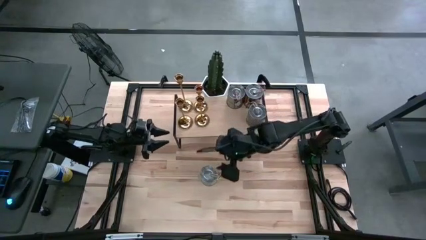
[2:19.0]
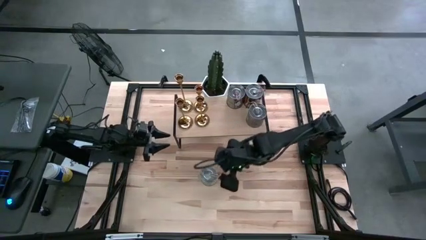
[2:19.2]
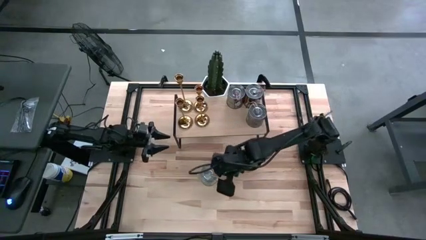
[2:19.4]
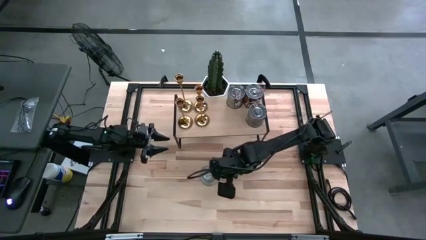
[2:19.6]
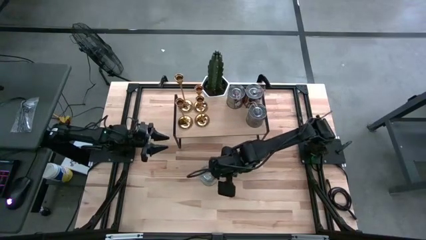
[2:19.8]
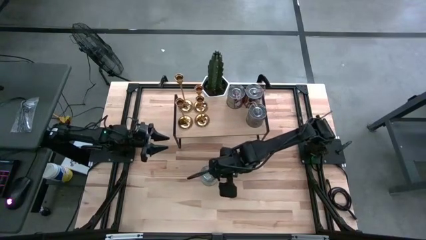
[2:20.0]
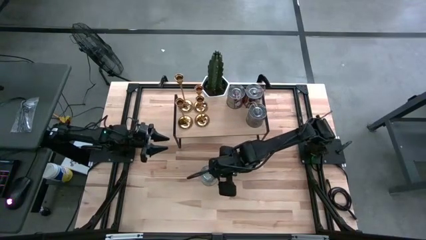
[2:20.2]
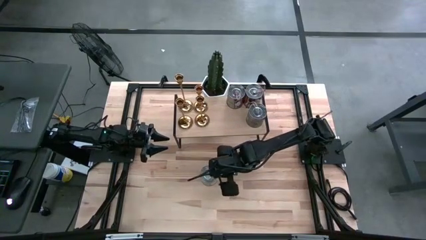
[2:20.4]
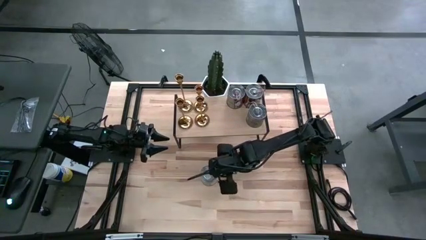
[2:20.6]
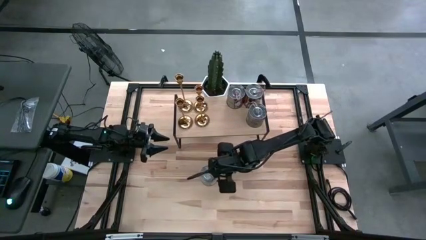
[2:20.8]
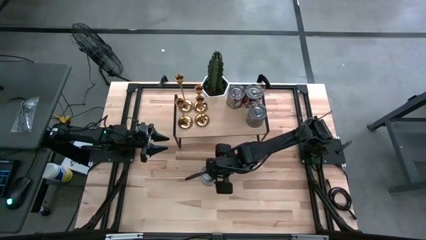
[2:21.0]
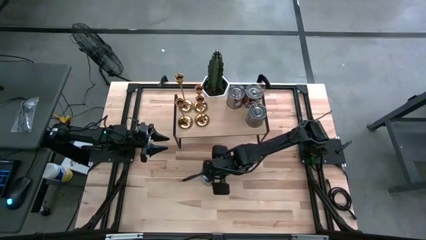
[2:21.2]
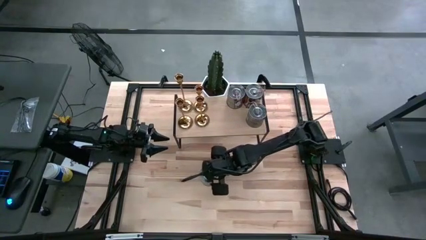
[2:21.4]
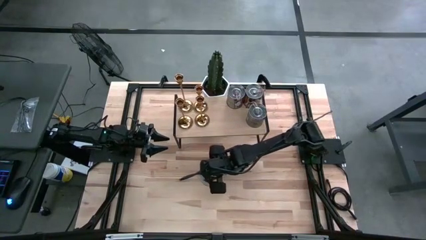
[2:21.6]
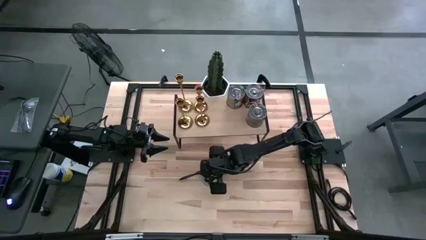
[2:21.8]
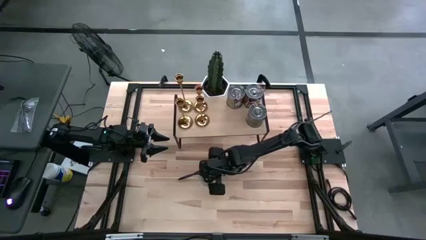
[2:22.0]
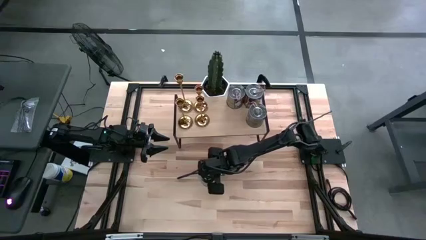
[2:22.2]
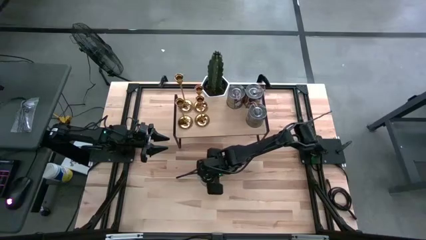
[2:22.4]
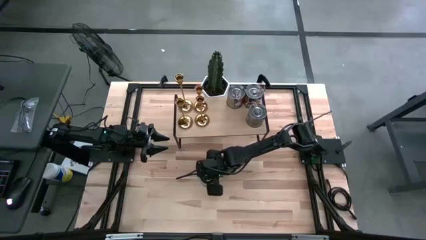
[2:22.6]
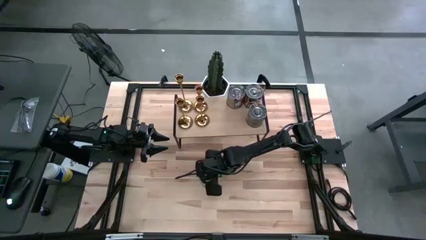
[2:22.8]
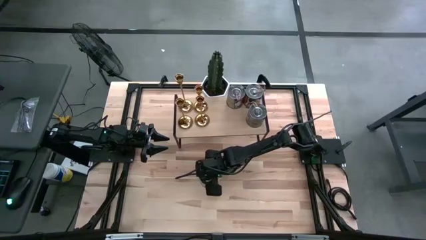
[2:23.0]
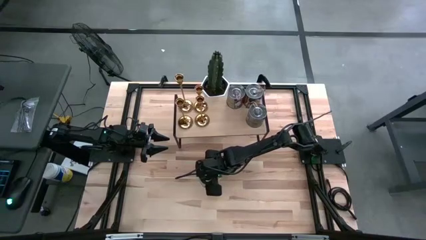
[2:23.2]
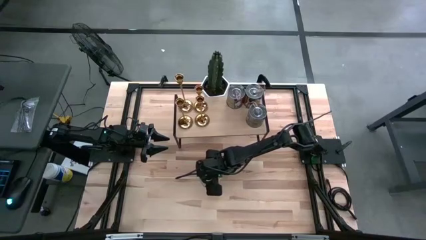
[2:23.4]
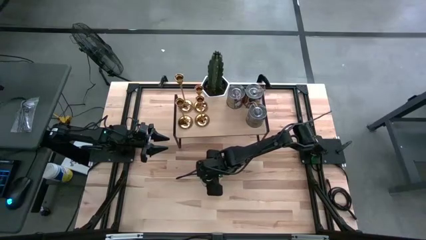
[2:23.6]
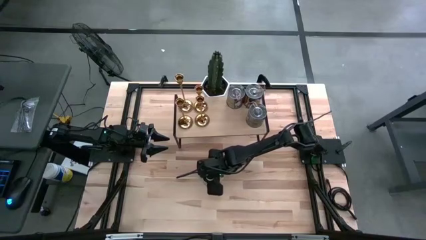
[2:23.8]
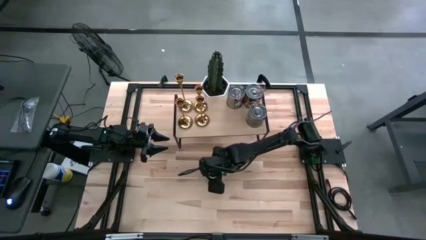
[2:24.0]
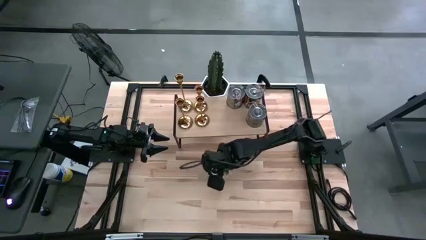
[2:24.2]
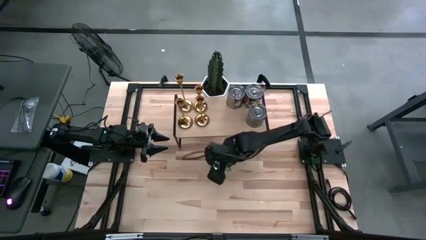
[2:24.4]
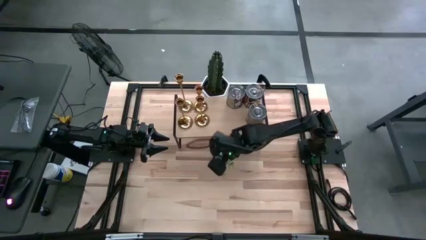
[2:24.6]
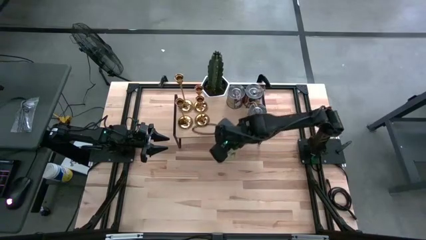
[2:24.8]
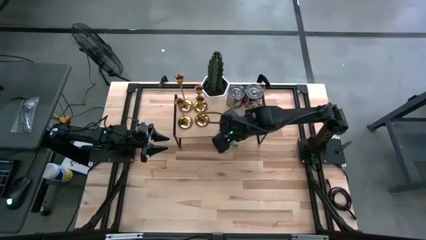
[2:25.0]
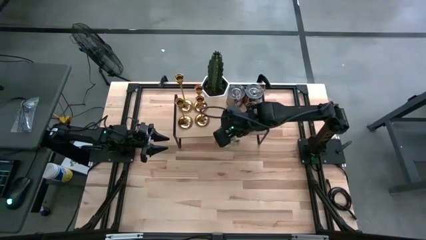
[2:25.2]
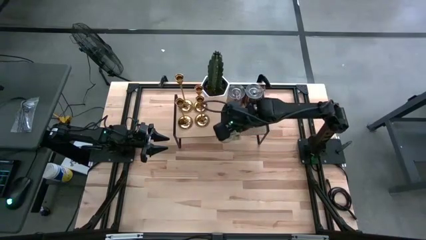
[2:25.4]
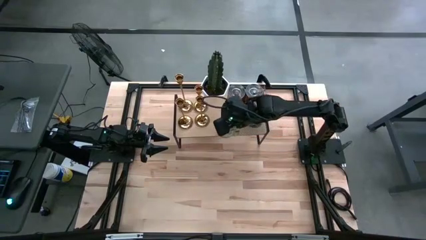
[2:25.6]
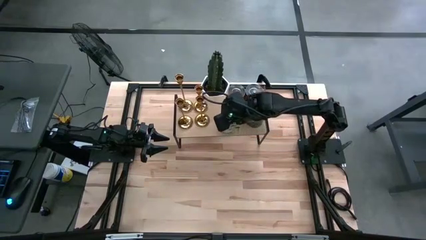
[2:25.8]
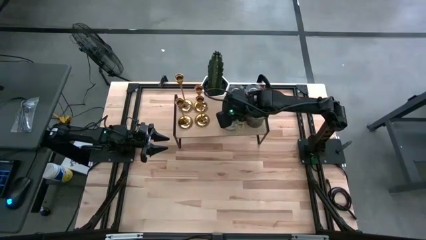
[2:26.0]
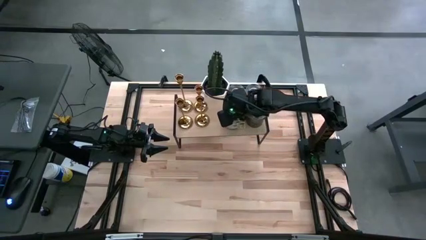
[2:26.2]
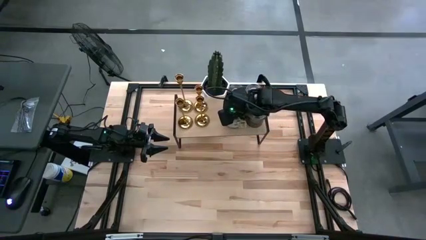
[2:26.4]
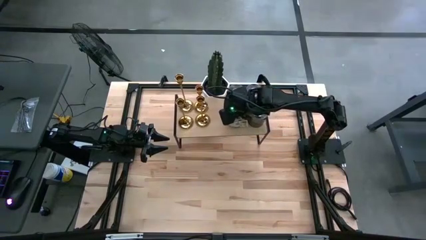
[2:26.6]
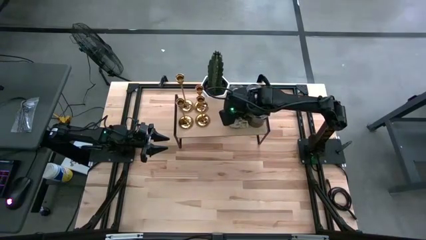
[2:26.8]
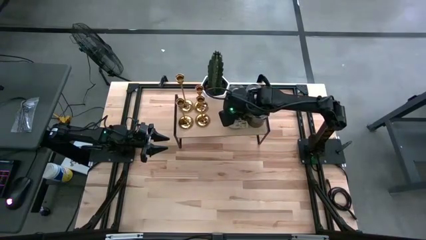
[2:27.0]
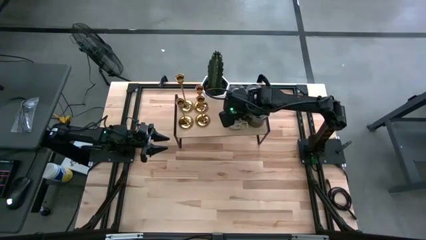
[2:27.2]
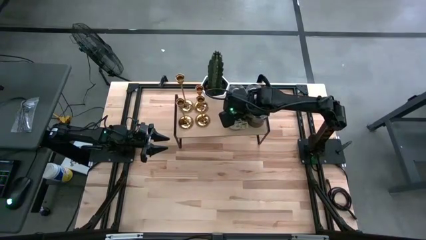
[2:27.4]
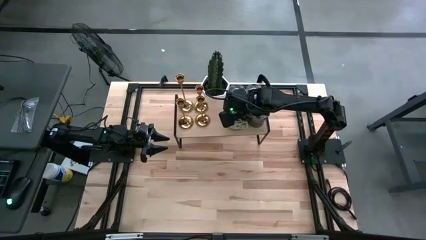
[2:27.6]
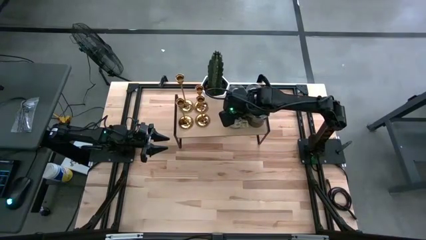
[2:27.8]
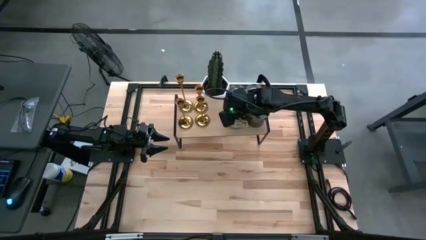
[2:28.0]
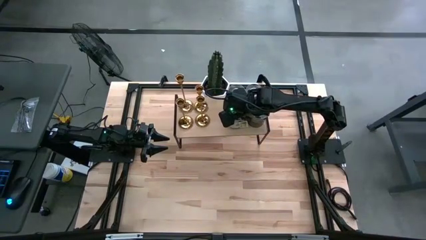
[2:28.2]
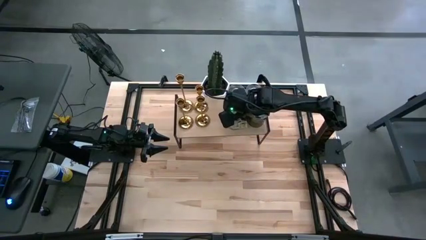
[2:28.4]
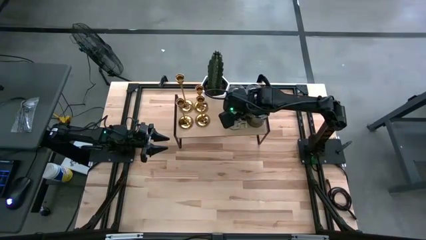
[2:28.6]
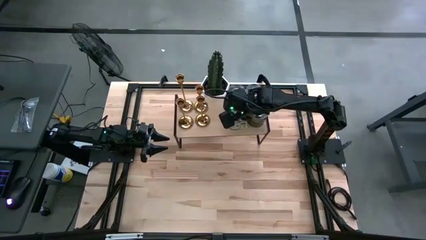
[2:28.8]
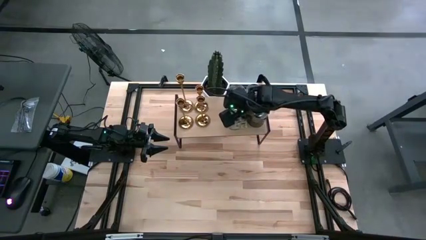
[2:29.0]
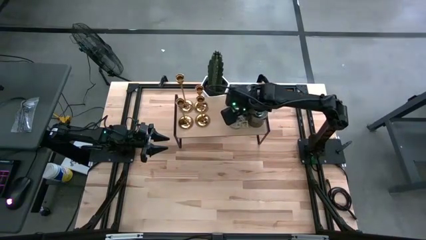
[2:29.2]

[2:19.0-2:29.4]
Task: Pick & Place candle stick holders
Put the silver scented candle can on the shelf

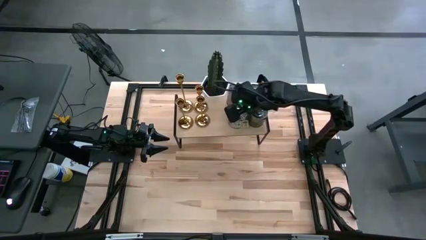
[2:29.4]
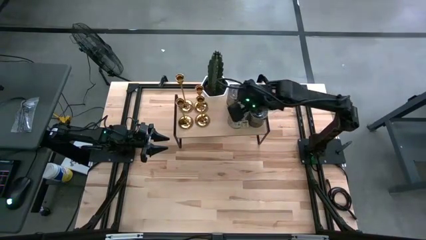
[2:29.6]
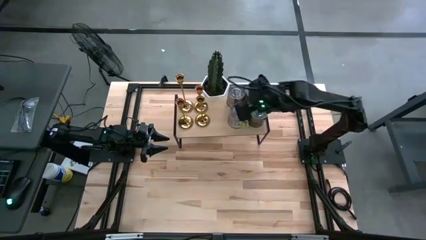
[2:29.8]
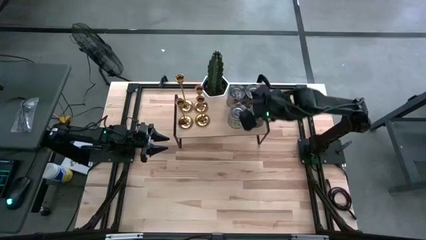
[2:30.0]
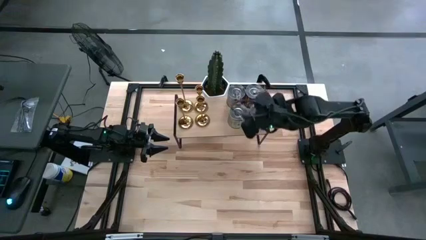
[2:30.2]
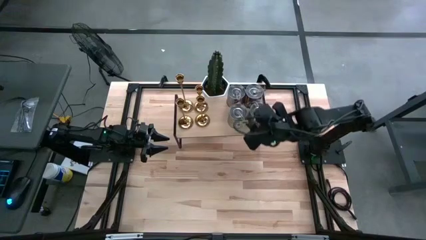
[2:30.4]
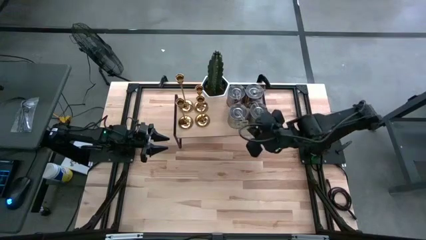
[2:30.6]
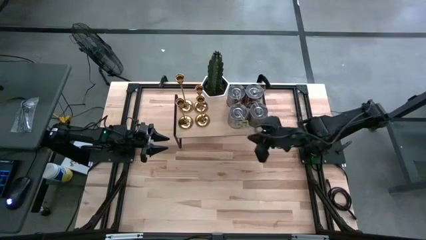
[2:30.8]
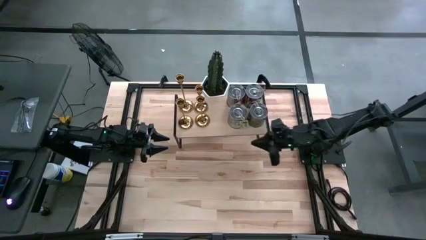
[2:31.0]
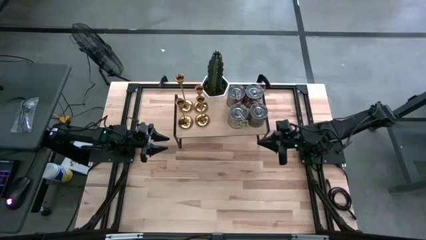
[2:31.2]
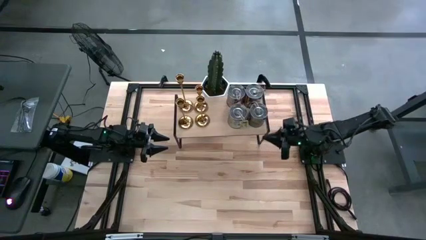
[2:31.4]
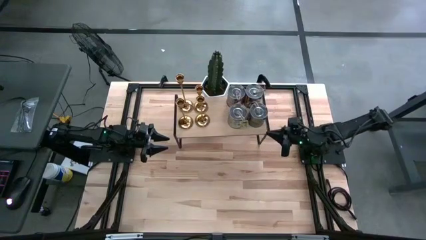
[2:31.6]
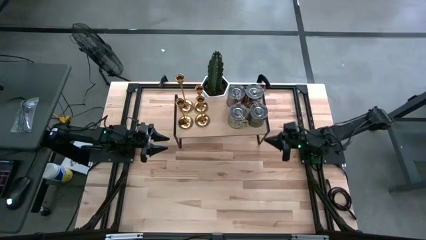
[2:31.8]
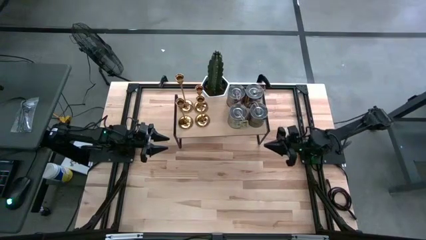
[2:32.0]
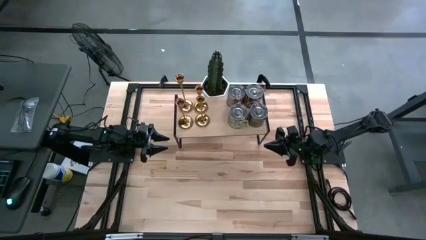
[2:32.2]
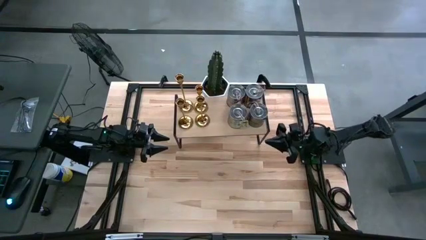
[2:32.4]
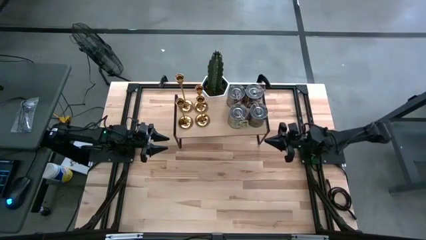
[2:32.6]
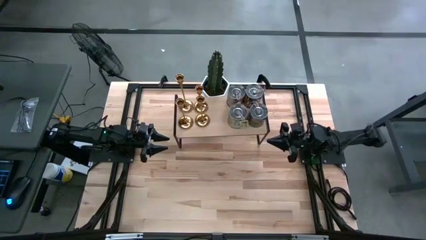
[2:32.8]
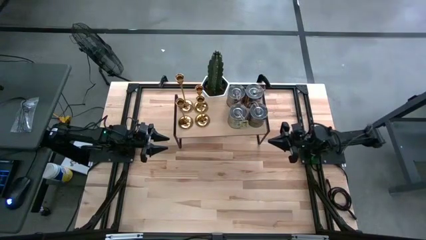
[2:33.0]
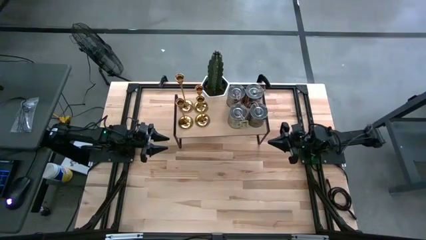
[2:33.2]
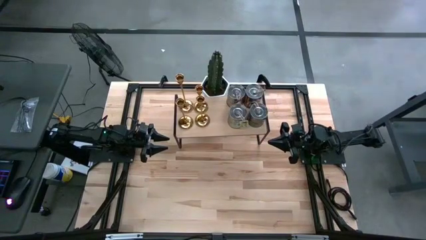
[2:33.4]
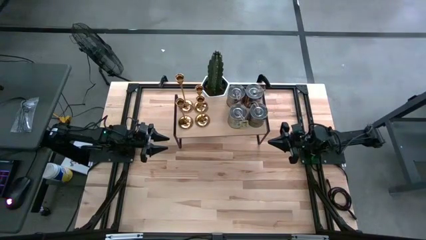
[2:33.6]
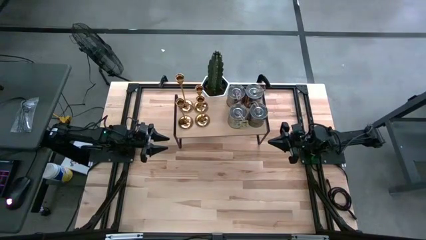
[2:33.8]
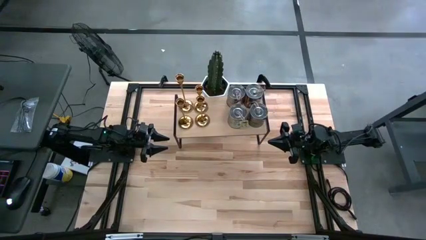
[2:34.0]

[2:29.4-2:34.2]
Return to Home Position
